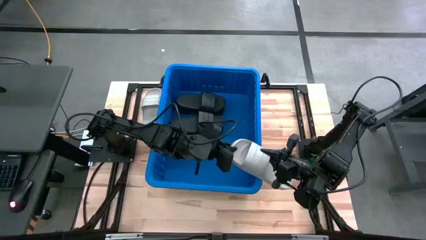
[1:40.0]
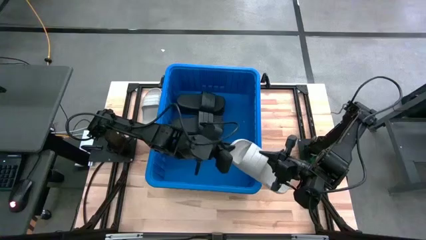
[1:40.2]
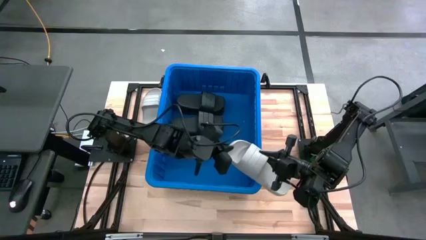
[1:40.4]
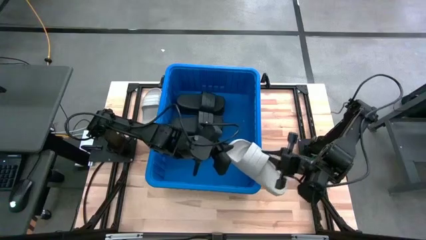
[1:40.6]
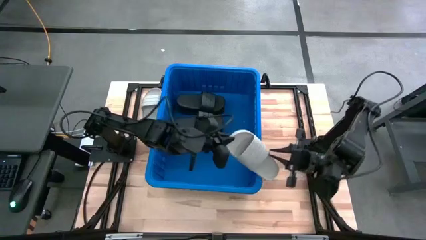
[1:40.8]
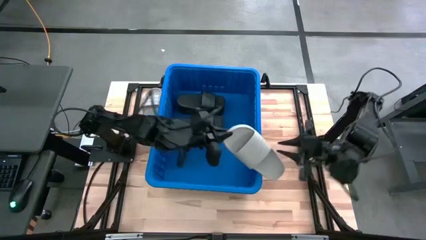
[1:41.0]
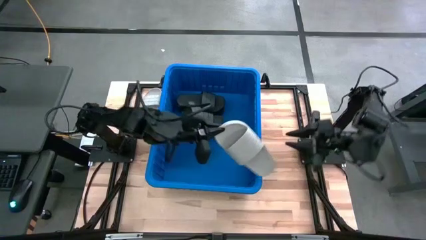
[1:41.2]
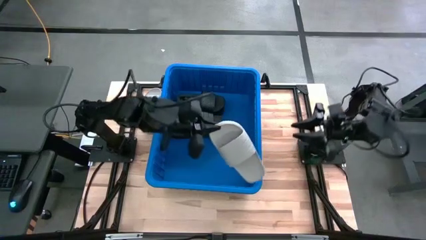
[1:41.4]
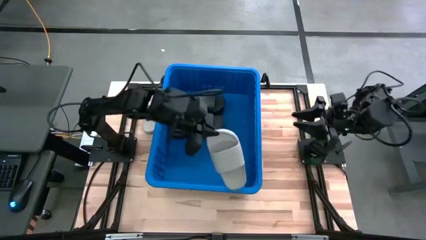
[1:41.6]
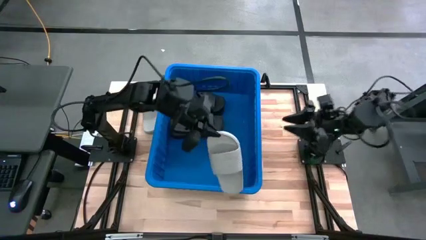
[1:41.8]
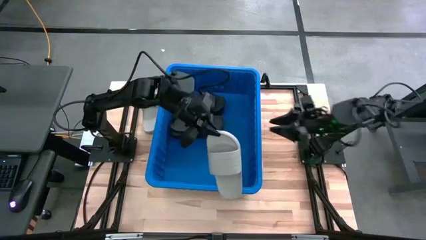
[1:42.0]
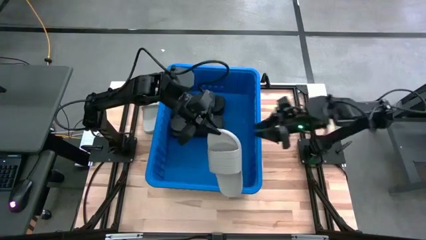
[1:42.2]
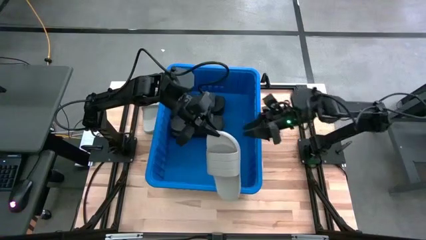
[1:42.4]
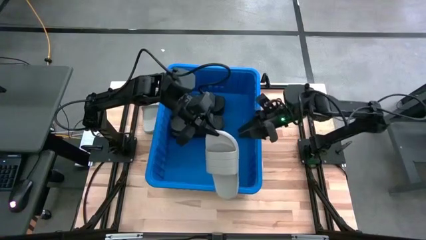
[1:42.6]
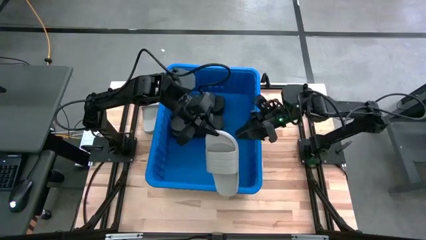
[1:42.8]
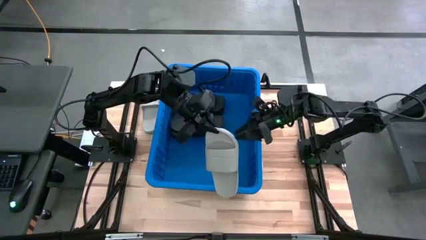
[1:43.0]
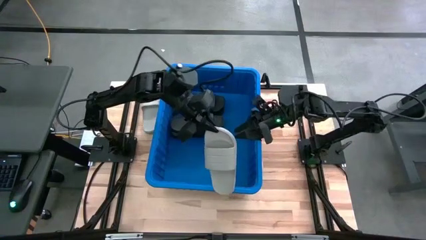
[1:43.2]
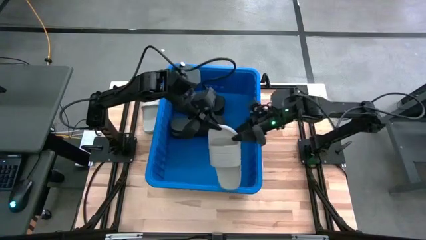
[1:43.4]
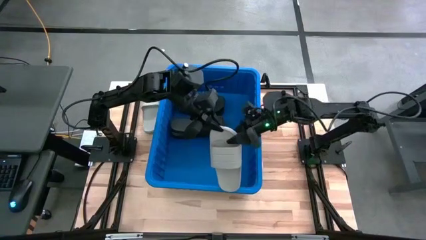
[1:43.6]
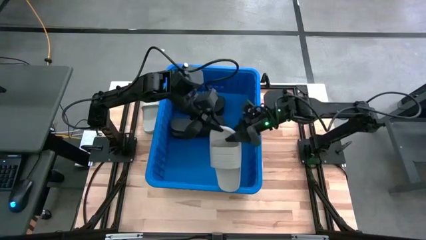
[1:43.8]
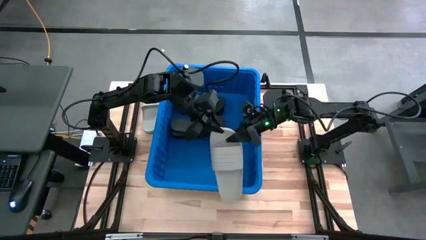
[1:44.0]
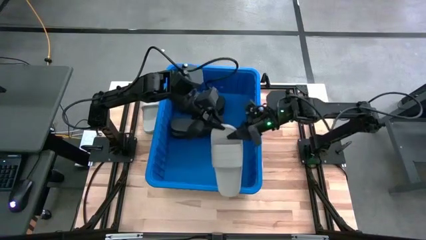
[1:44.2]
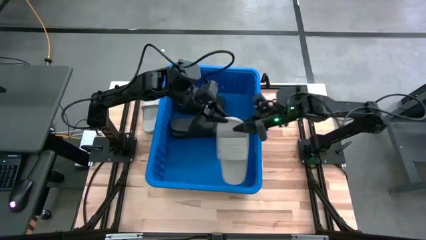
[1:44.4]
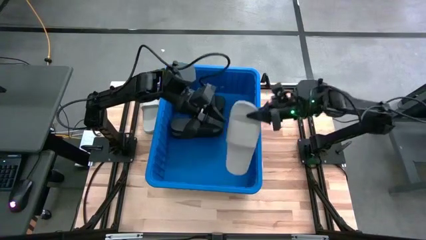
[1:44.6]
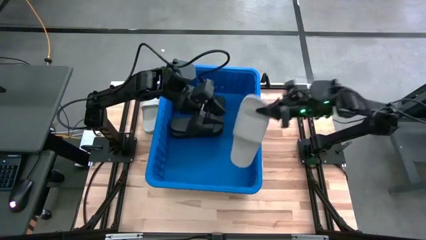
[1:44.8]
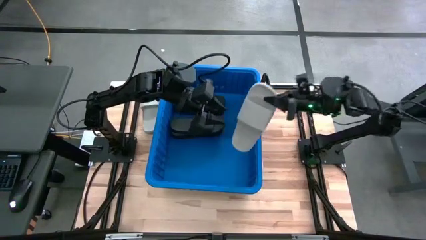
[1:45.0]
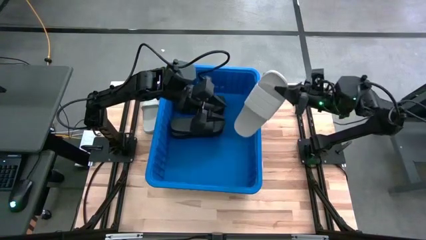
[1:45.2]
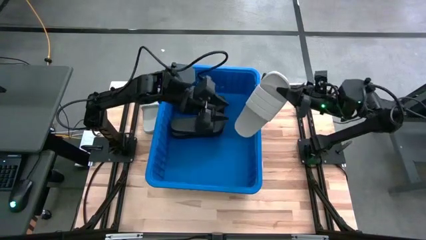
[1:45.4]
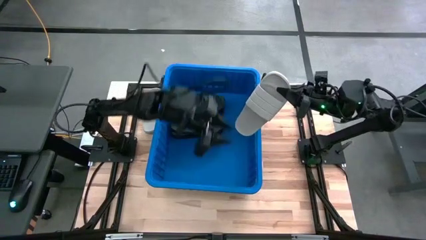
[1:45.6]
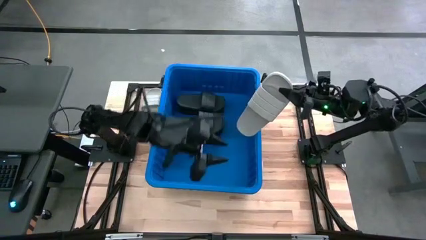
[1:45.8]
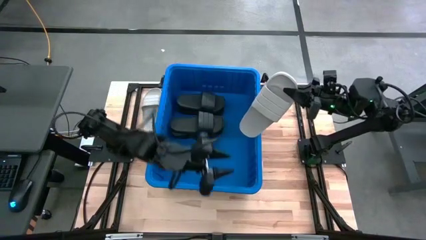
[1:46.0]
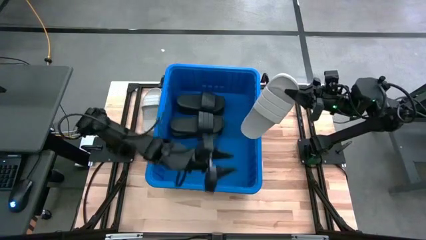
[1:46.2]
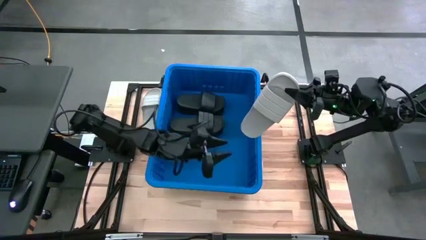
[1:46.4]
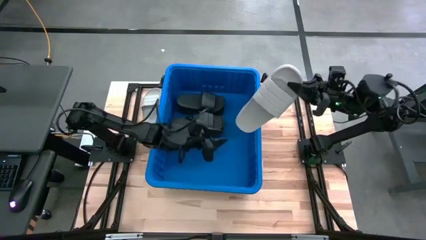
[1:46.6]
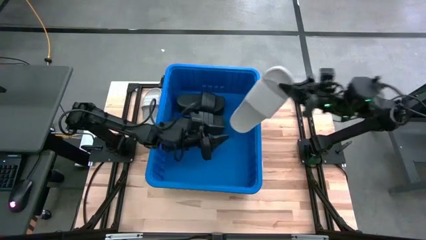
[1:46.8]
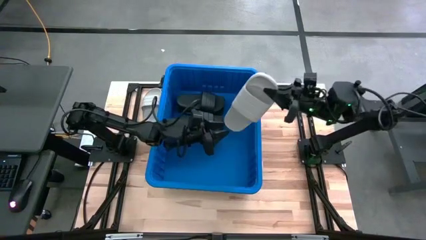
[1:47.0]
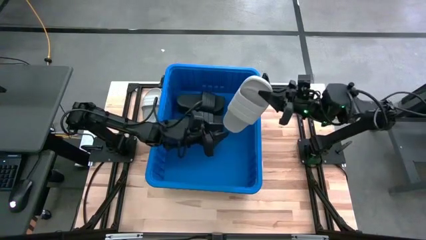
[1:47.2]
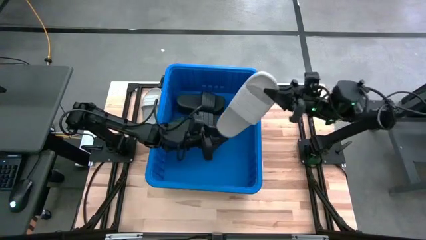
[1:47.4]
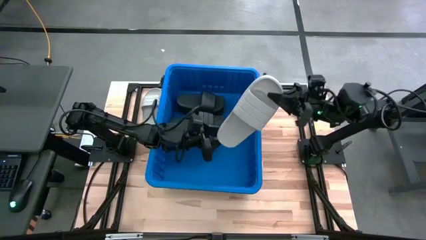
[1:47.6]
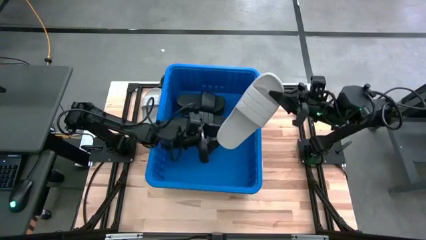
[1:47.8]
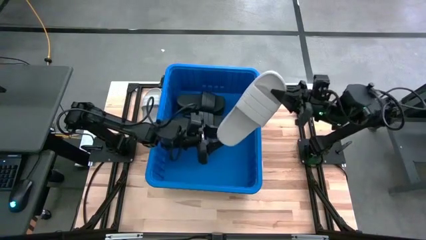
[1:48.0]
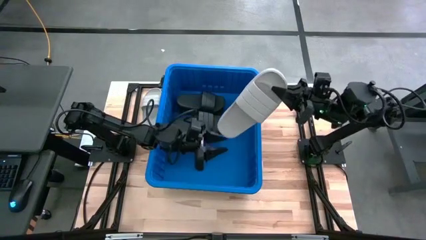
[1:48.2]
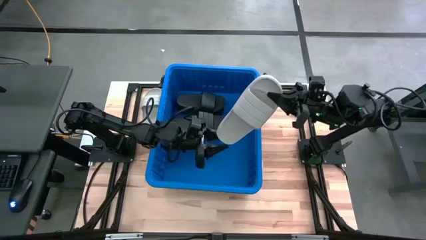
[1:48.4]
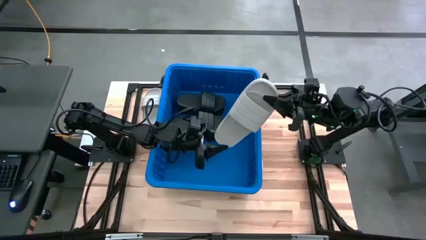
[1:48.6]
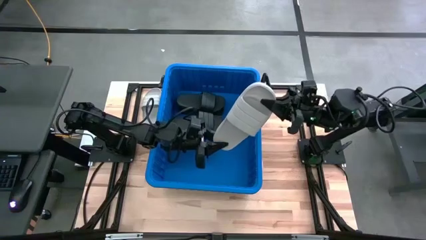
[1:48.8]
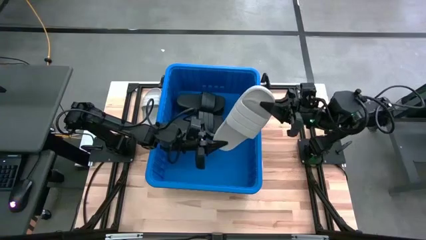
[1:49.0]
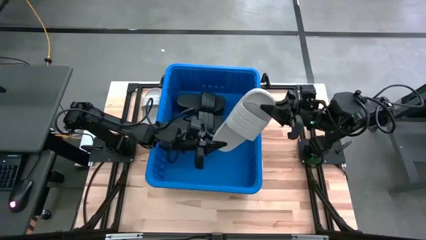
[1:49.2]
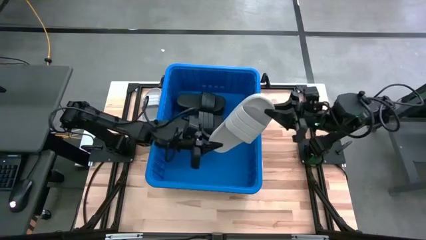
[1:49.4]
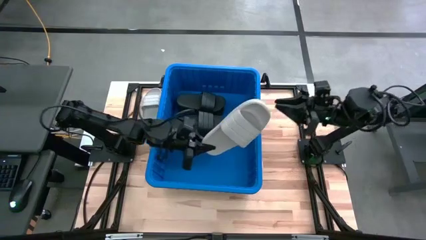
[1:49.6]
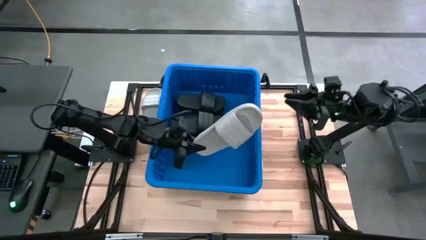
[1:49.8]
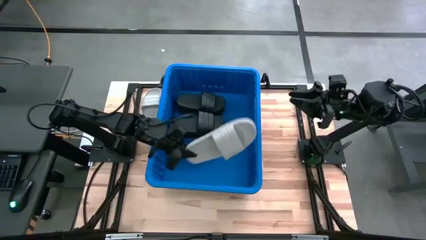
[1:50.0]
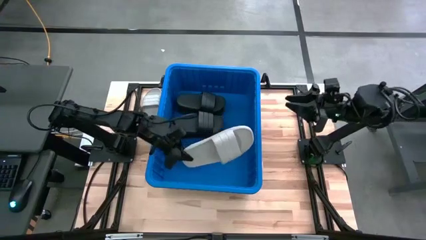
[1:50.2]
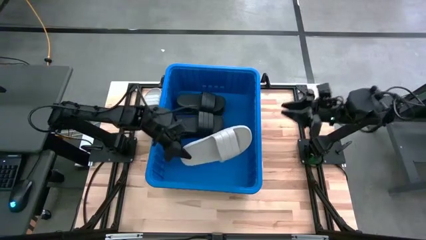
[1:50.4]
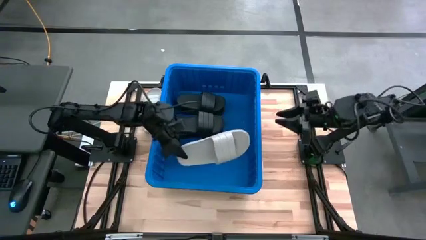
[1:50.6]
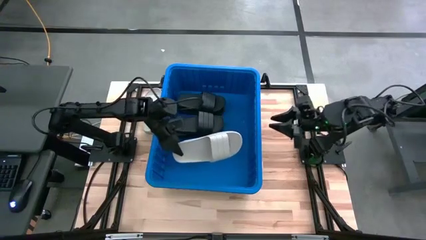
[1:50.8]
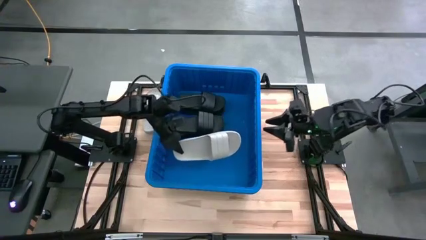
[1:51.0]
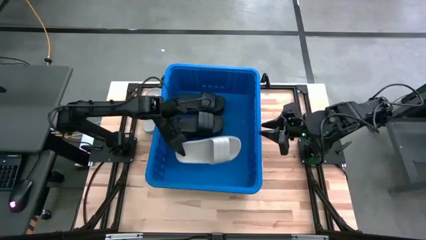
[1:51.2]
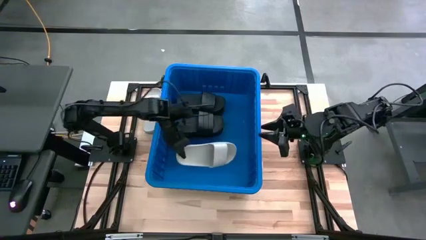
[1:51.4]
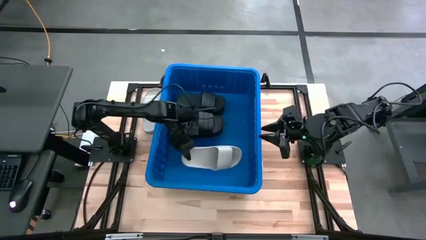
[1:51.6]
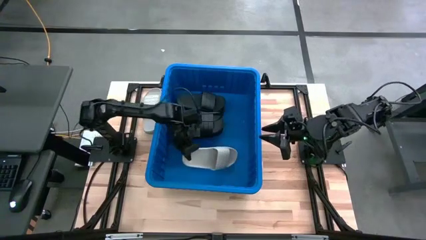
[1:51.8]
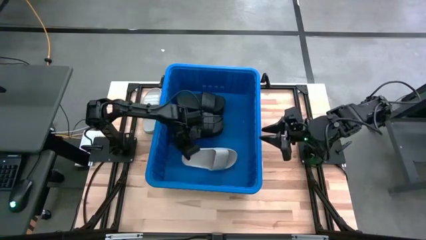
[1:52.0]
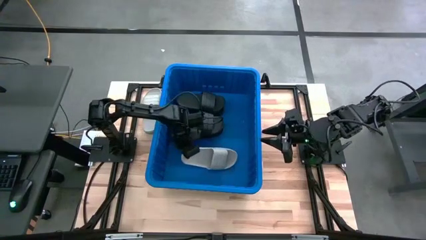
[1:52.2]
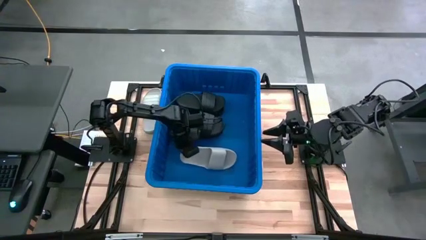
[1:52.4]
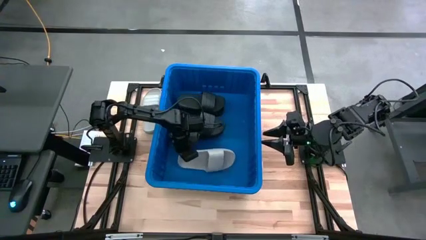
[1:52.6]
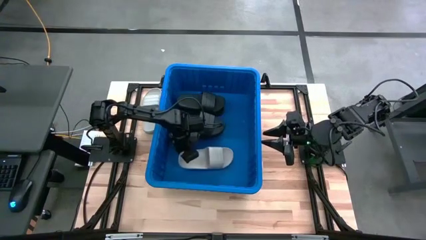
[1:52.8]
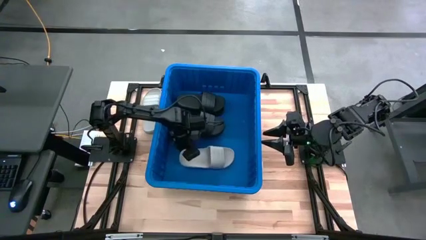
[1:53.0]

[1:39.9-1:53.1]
Task: Pick and place slides into bin
Put the right white slipper into the bin

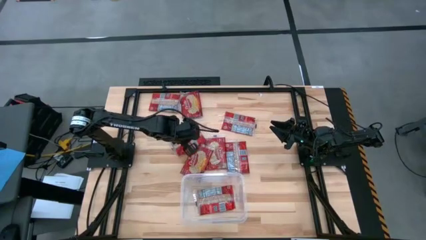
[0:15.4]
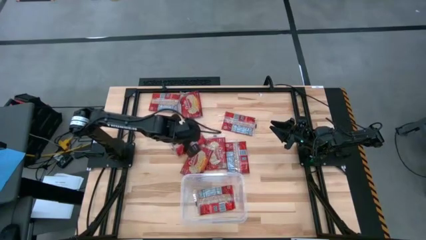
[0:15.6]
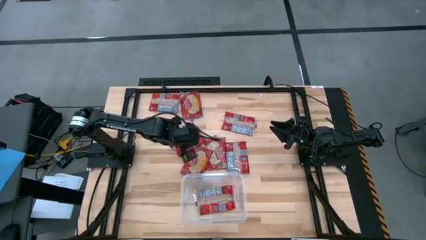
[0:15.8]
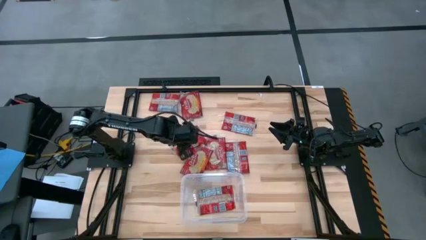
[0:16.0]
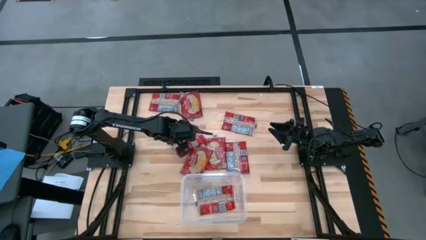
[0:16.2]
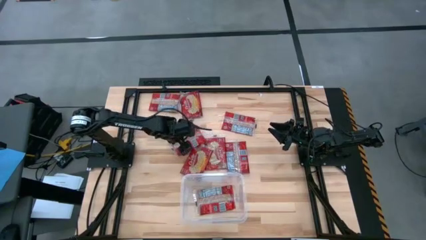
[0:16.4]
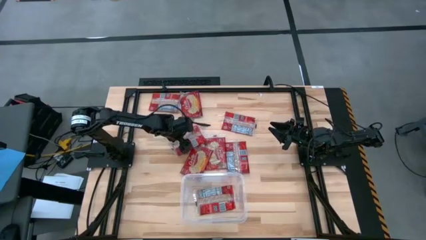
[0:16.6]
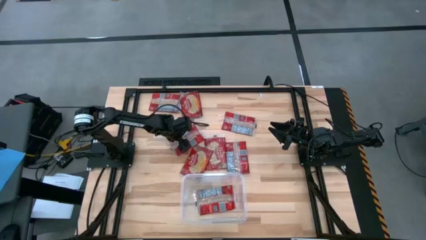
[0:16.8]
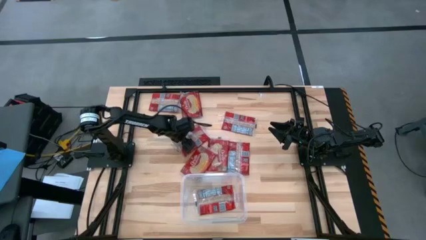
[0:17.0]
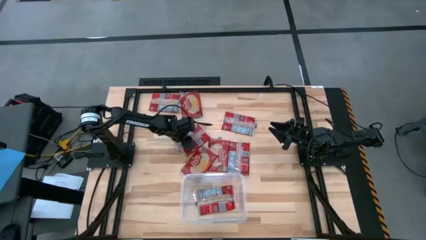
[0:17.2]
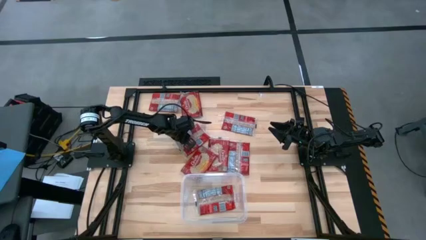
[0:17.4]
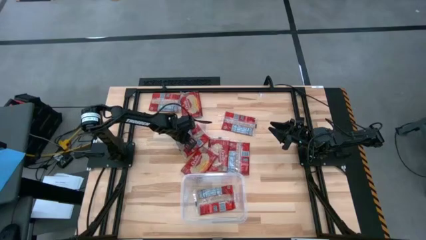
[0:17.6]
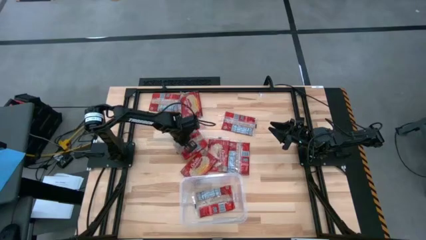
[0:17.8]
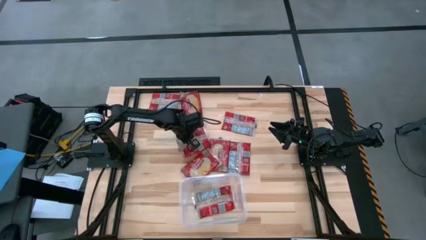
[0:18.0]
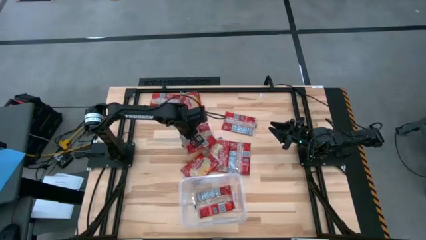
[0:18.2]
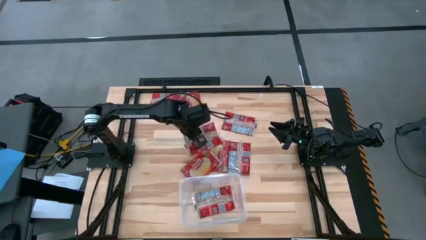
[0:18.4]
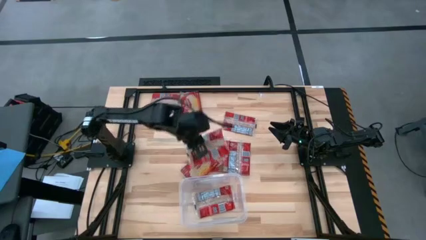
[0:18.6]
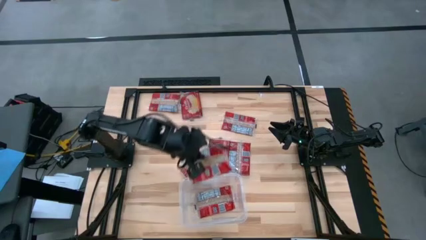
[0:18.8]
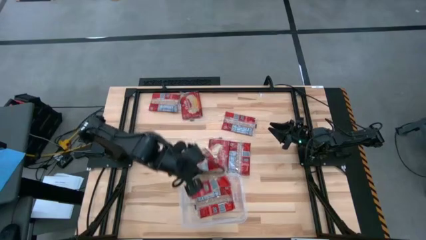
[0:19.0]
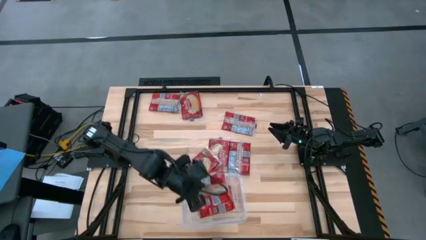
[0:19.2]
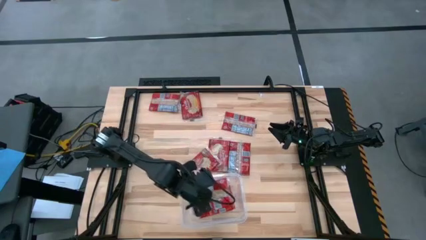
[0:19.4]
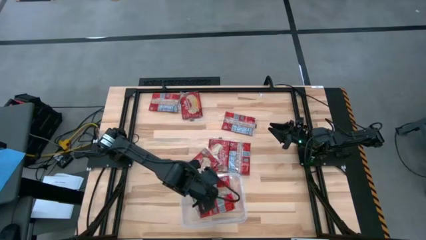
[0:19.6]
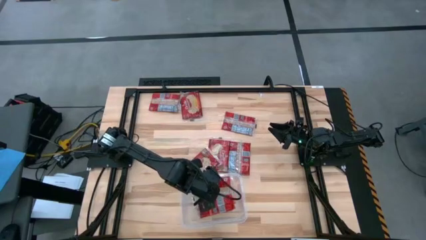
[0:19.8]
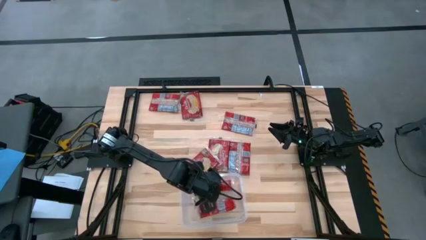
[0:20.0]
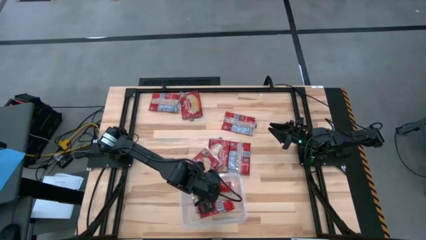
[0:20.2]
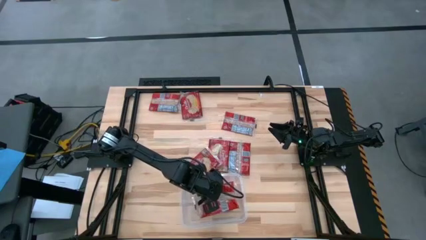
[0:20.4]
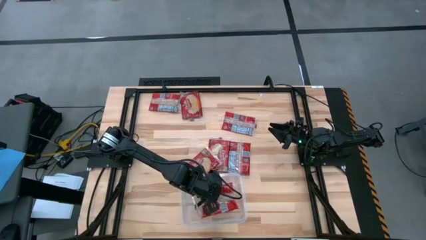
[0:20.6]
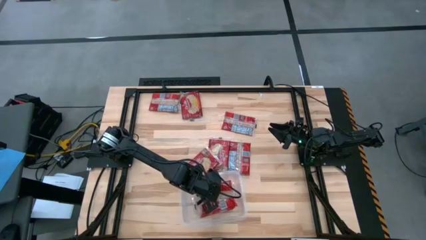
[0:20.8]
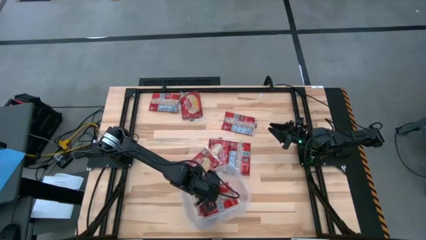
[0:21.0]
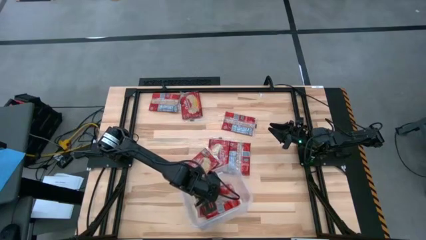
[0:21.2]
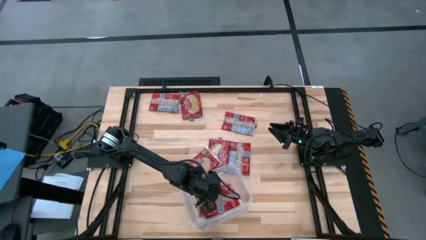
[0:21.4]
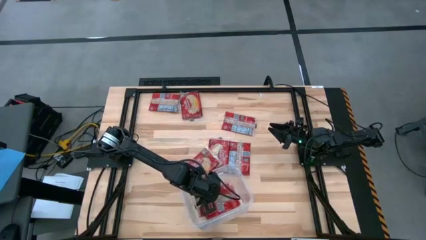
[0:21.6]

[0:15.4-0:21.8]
Task: Sort popcorn bags into baskets
Put the red popcorn bag into the transparent container
